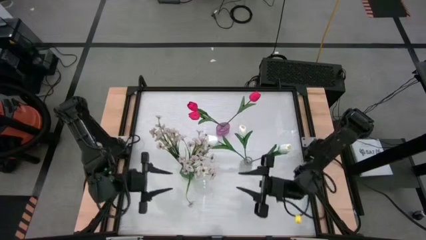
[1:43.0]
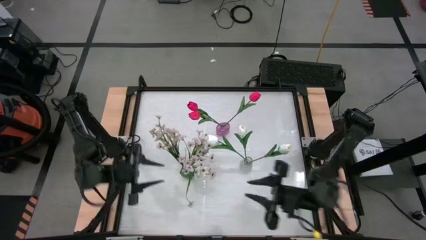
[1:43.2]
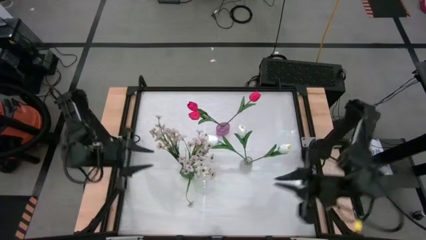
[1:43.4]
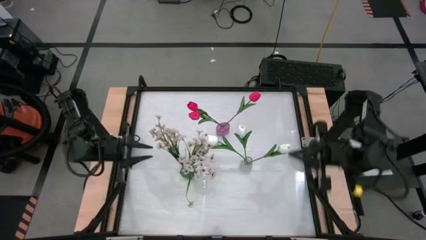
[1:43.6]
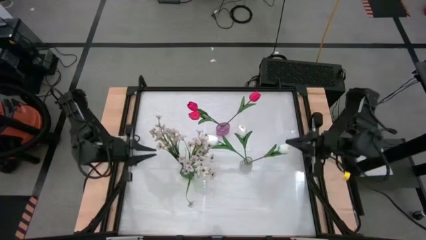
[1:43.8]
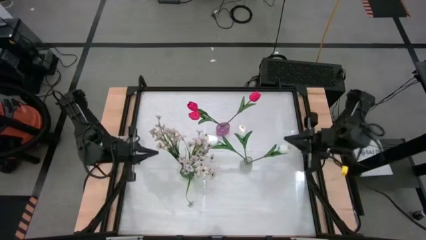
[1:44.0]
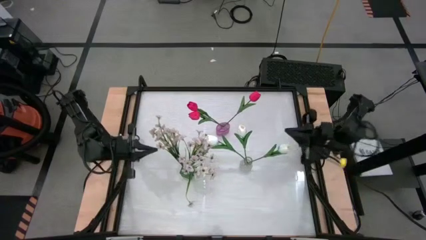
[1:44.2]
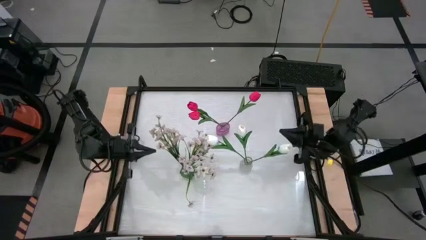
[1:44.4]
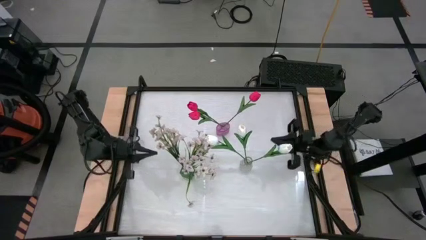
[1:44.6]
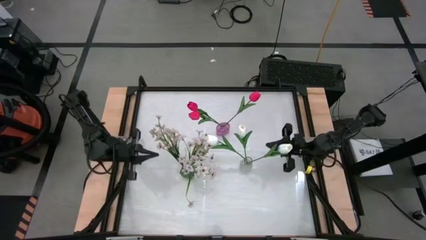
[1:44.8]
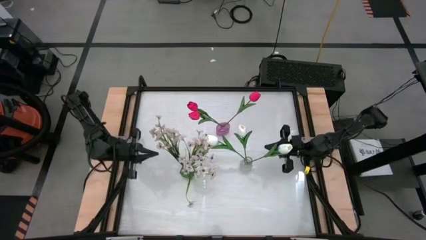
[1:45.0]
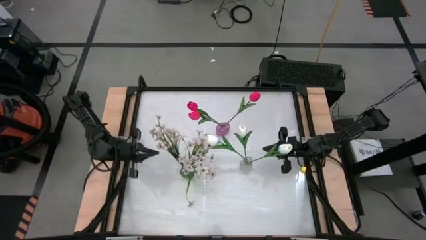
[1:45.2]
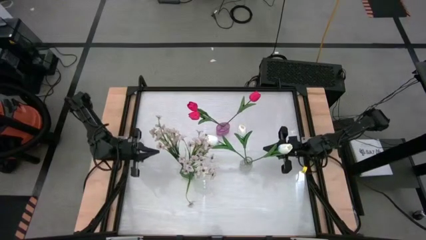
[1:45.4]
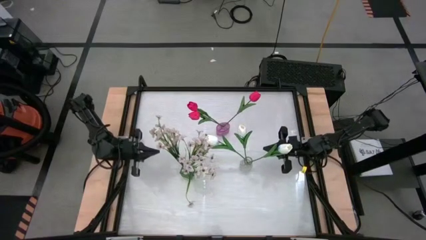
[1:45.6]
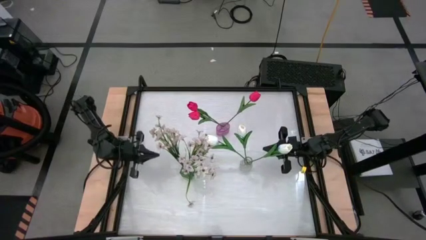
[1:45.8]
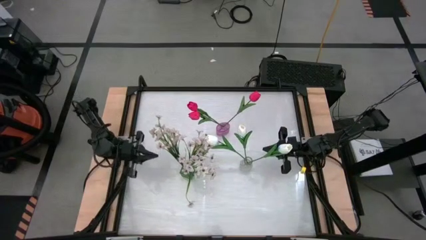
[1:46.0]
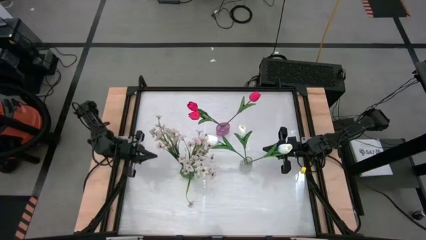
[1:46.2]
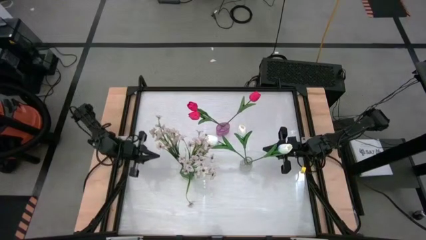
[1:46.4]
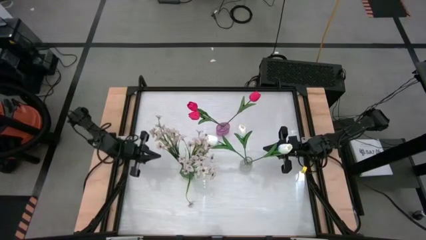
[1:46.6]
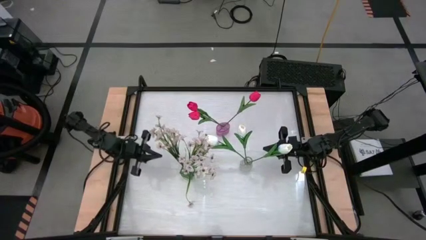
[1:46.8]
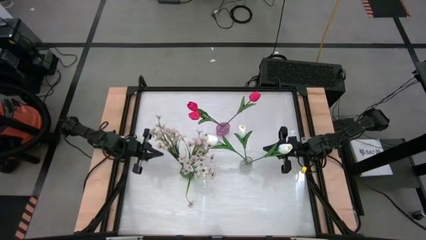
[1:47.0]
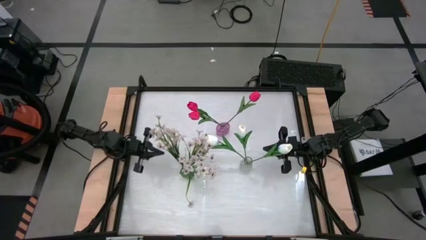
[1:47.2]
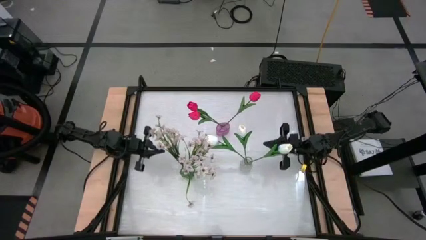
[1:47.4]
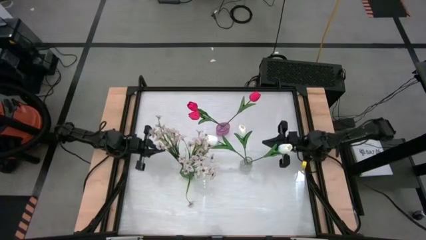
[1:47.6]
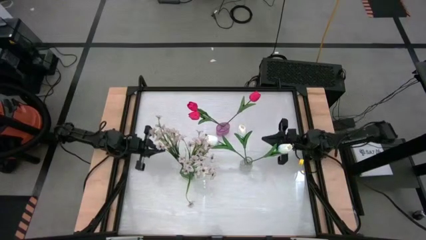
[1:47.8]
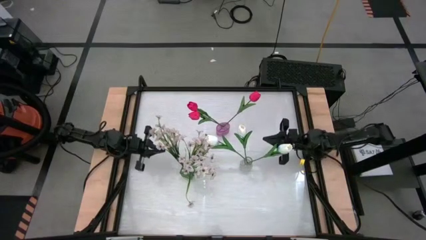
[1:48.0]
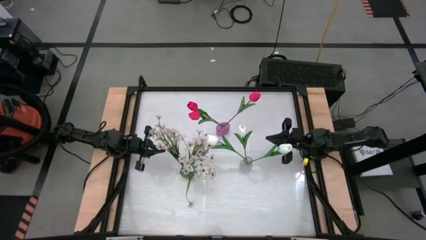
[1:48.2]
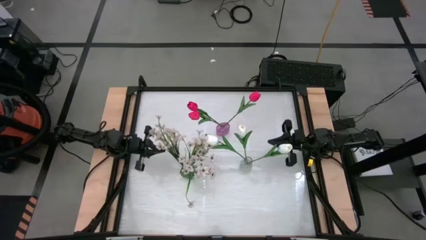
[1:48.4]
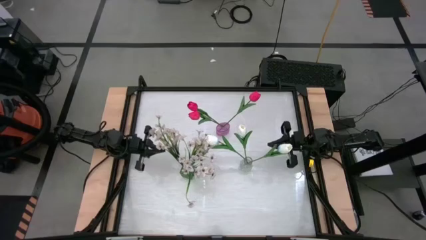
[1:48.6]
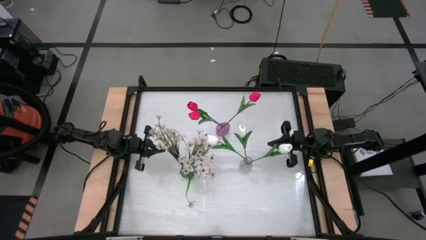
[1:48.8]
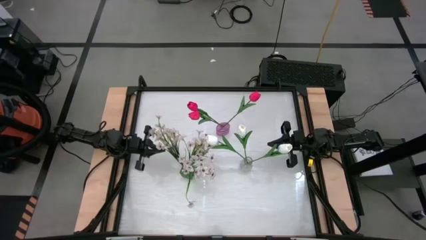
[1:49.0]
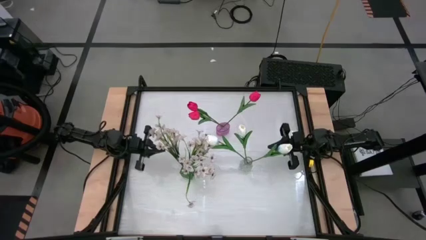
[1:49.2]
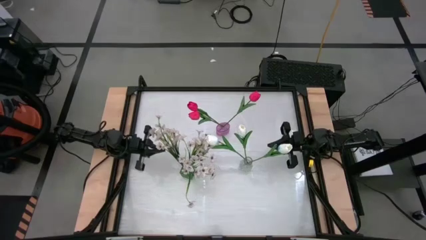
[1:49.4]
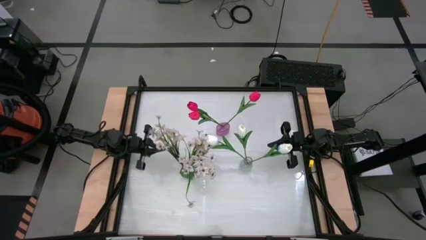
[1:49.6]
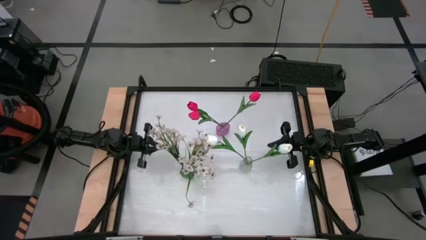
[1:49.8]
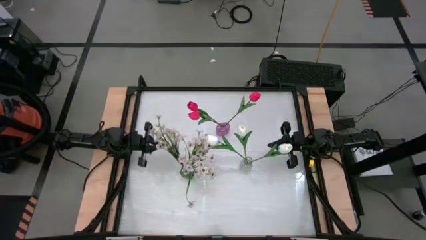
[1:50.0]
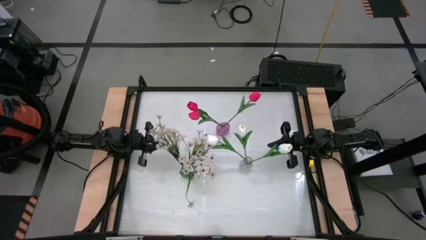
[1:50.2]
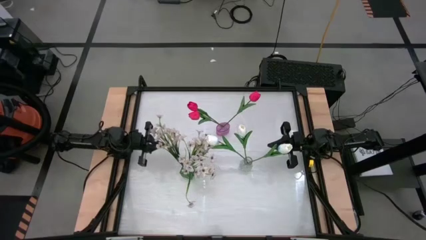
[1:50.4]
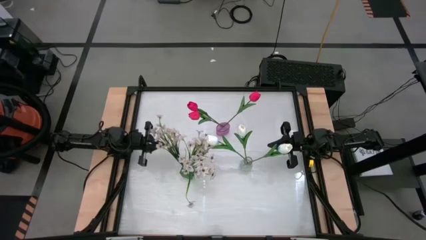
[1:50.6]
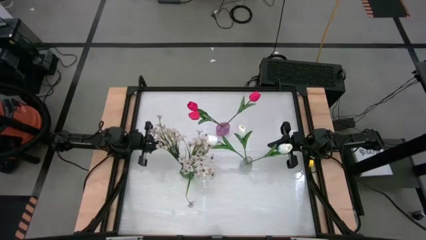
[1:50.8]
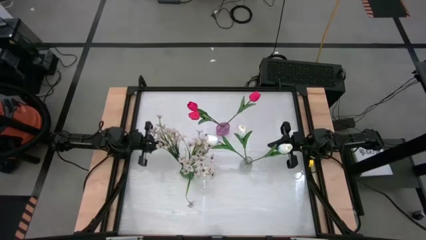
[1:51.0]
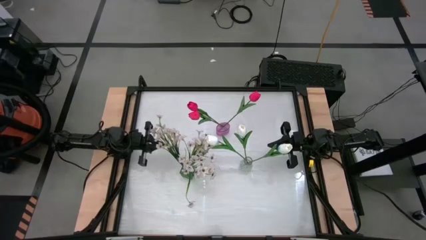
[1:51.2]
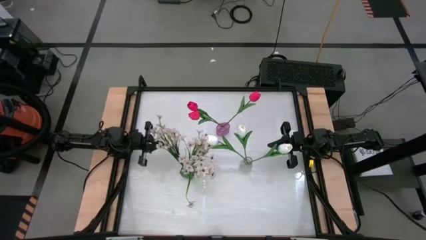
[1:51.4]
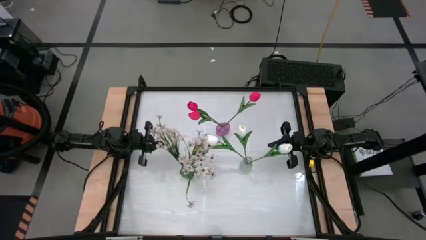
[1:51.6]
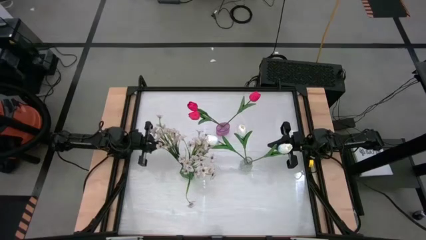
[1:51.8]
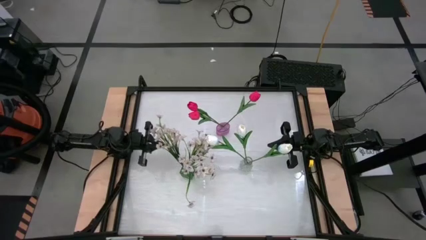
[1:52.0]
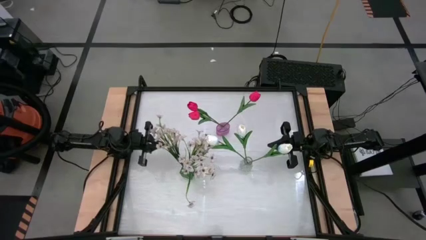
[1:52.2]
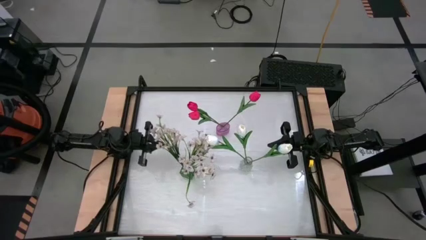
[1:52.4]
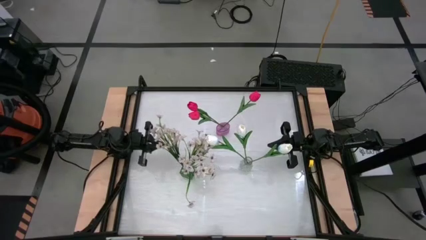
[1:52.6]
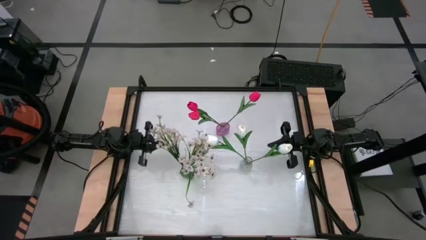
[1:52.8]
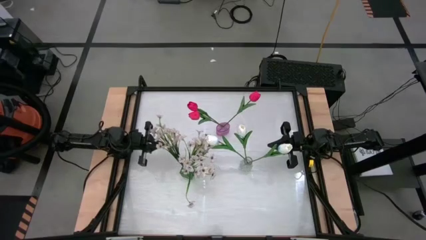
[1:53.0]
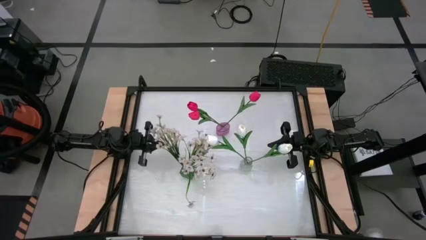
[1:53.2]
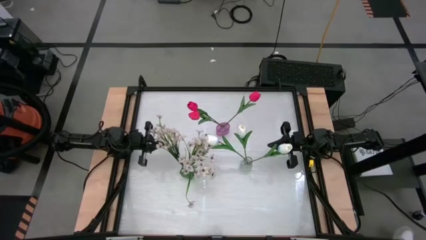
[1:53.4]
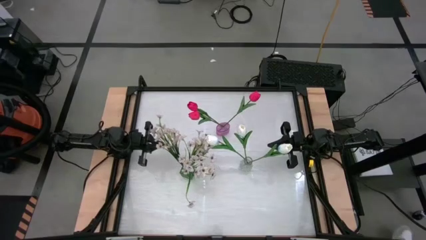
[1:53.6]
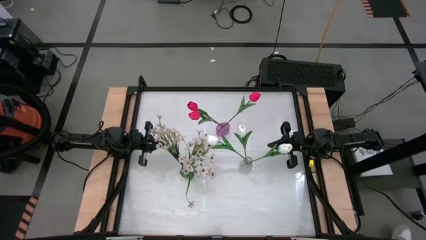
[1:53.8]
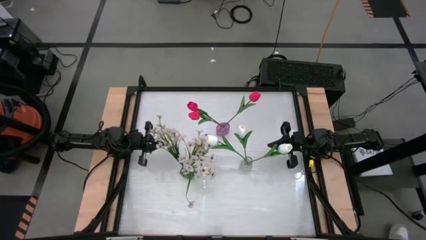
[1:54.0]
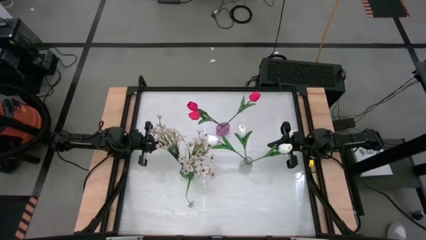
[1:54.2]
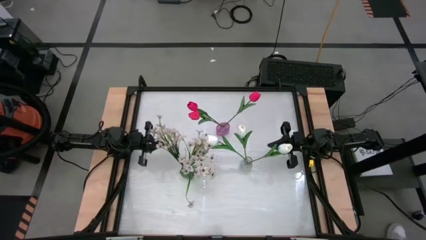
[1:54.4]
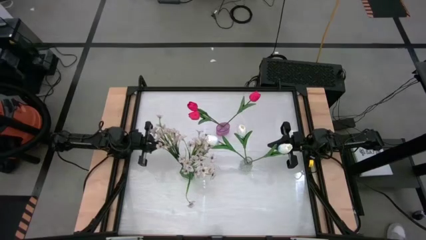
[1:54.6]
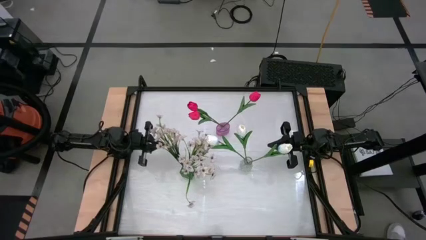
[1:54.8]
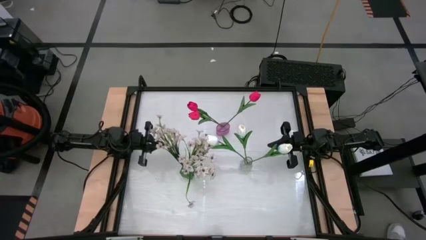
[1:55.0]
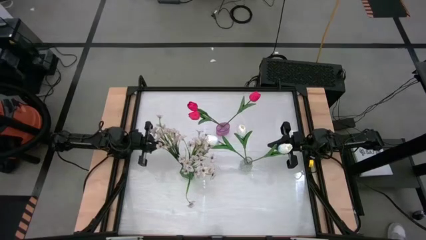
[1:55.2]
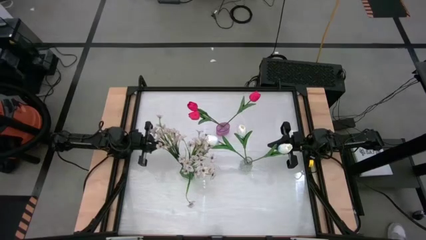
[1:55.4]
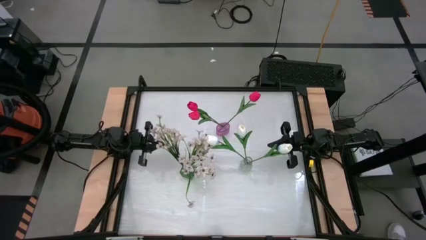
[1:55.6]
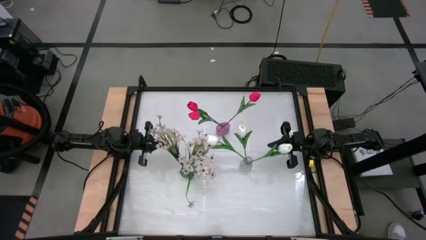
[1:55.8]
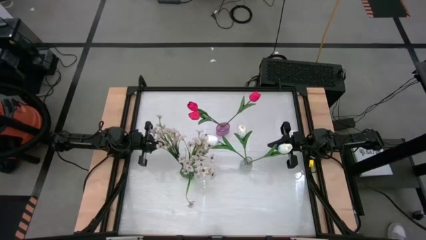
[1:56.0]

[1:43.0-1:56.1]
Task: Sort flowers into vase by color
Return to Home Position

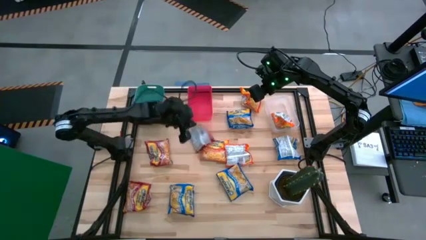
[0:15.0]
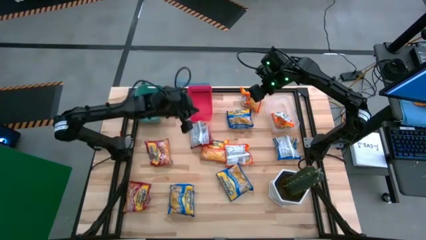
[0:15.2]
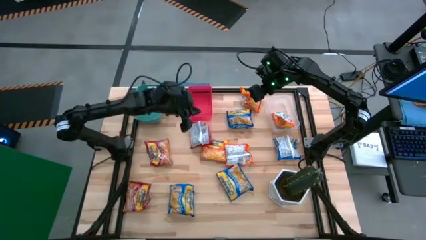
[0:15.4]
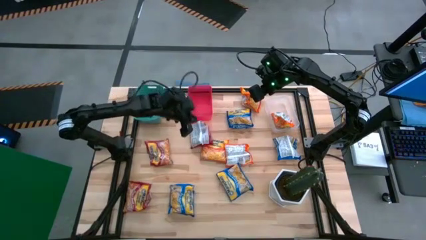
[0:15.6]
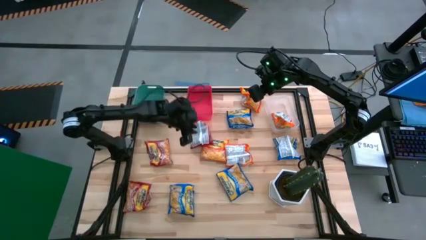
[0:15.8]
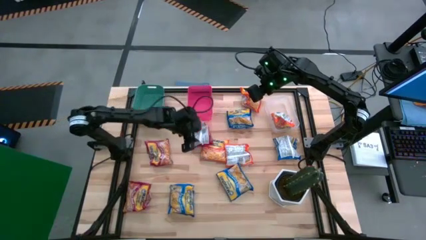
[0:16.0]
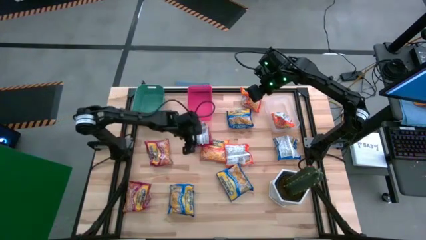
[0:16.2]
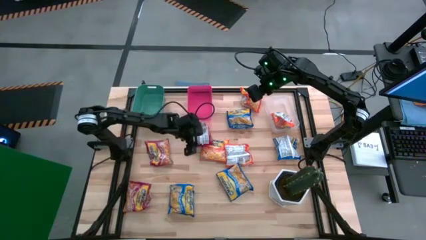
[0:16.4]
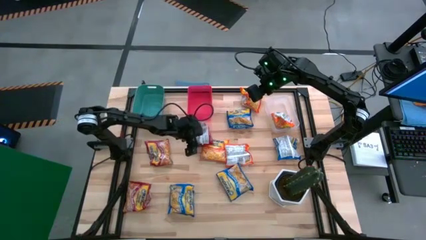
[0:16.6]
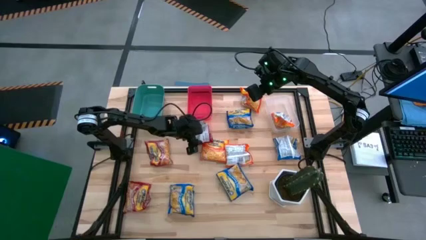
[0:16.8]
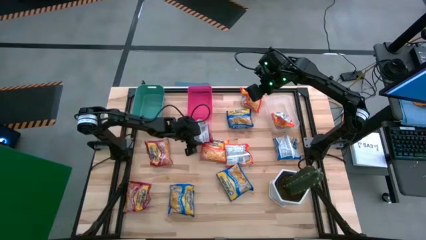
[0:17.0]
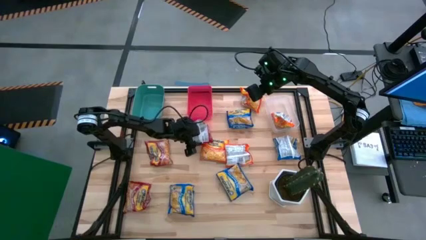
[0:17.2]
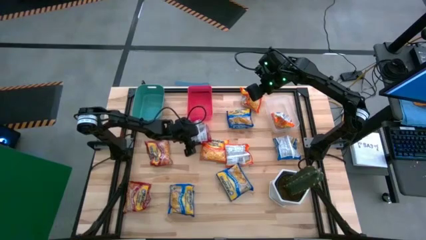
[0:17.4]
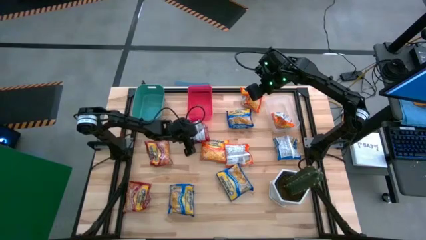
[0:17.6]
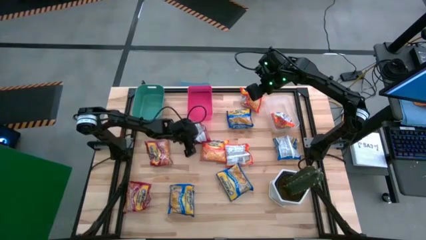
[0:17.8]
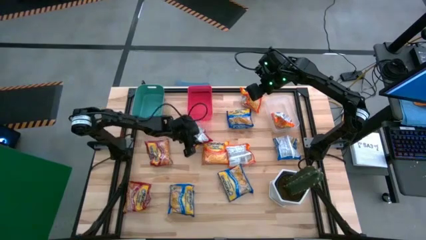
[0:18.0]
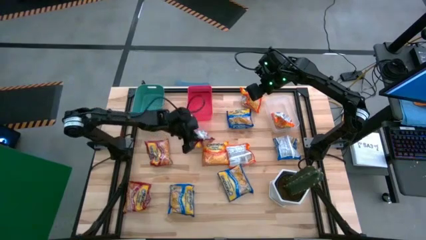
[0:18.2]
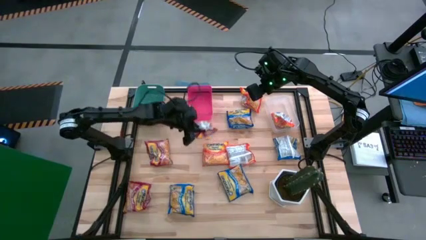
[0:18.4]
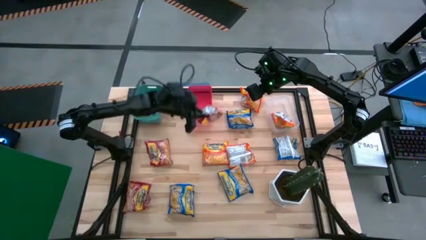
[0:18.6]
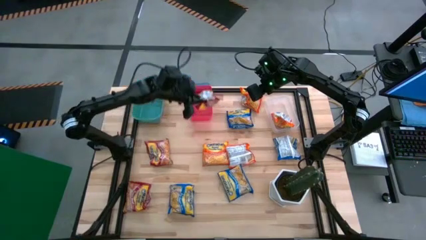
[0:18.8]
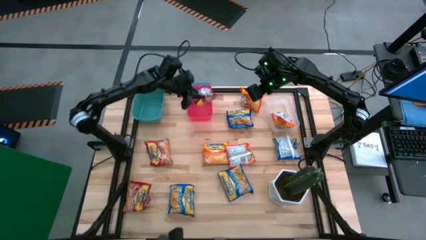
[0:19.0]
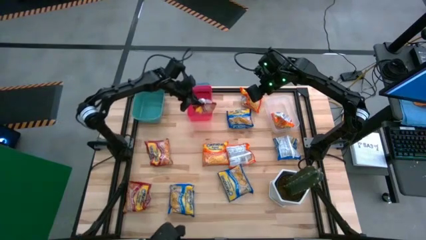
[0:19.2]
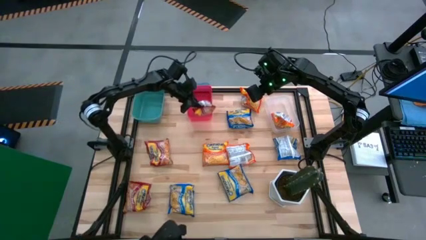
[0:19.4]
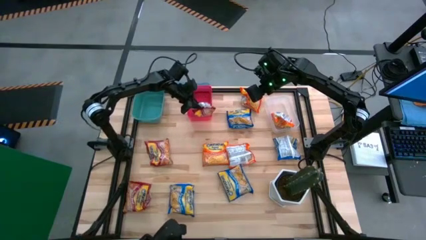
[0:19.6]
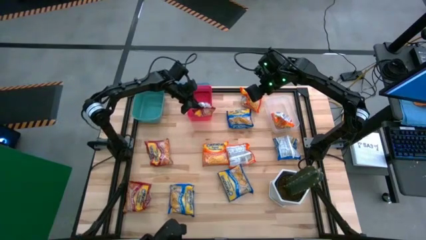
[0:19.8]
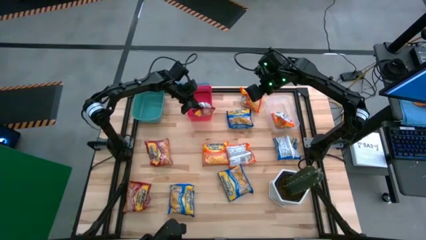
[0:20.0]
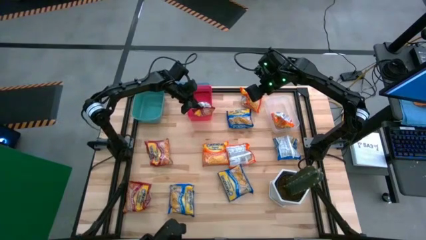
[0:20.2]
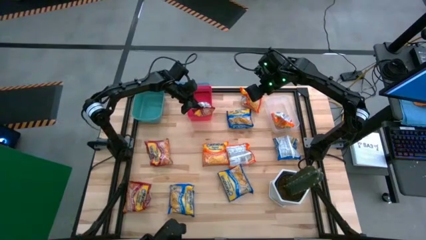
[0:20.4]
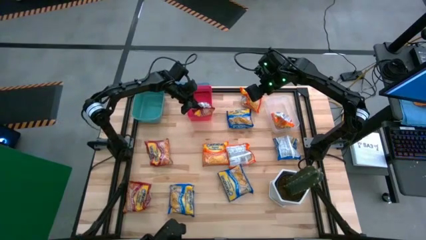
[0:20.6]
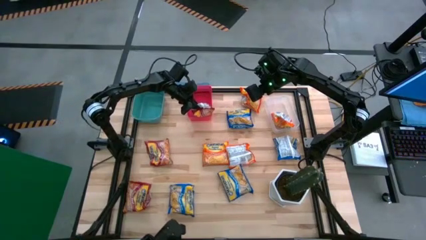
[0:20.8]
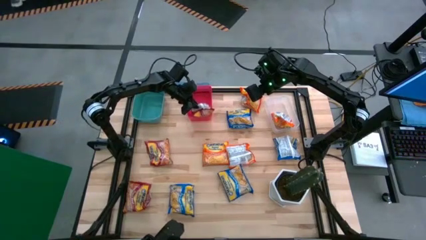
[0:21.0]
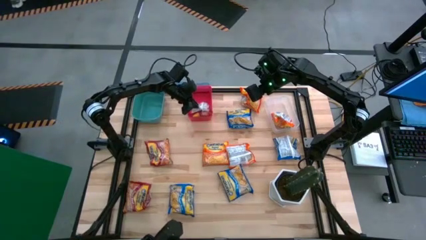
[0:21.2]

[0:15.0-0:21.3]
Task: Sort Maruchan noodles
Put the red noodle pack into the red bin
